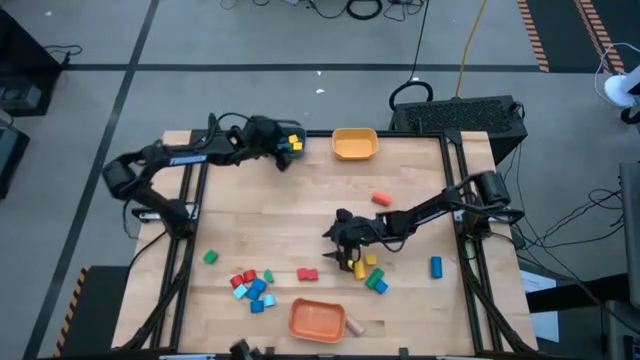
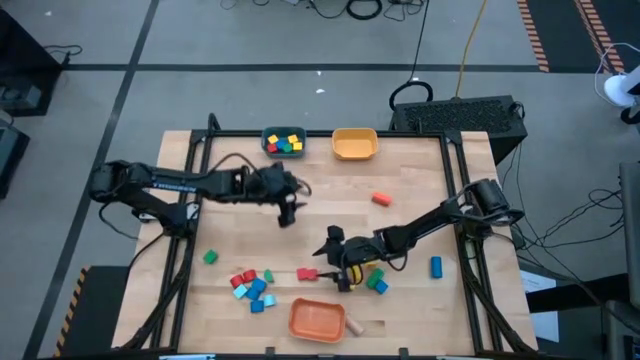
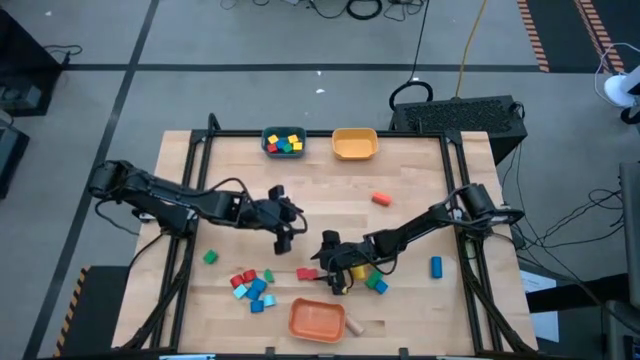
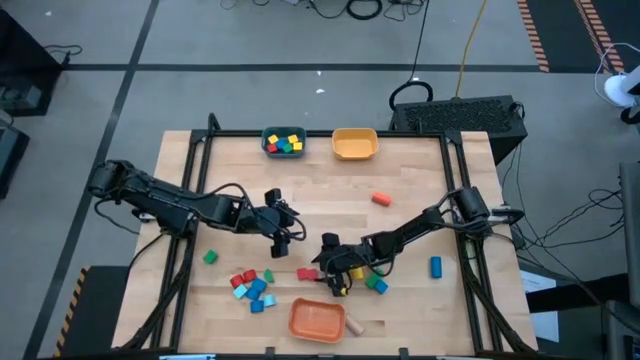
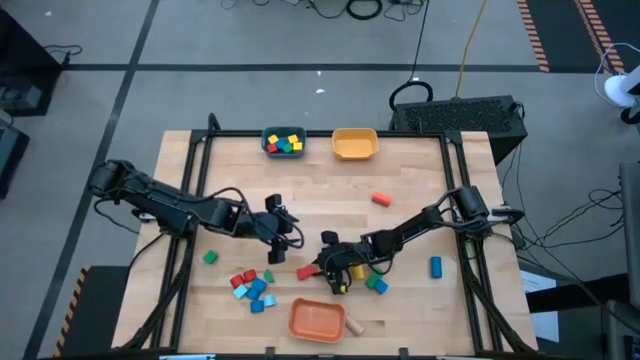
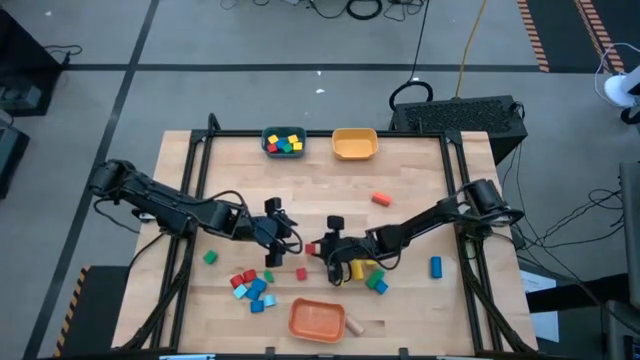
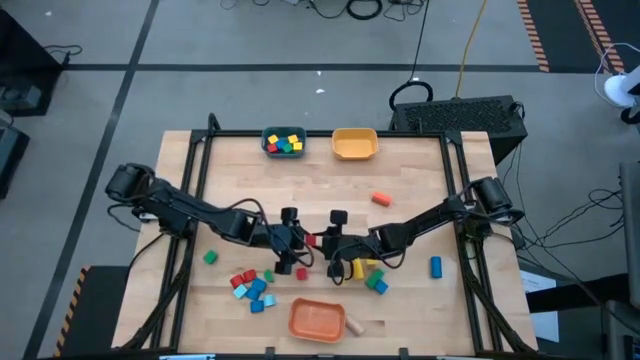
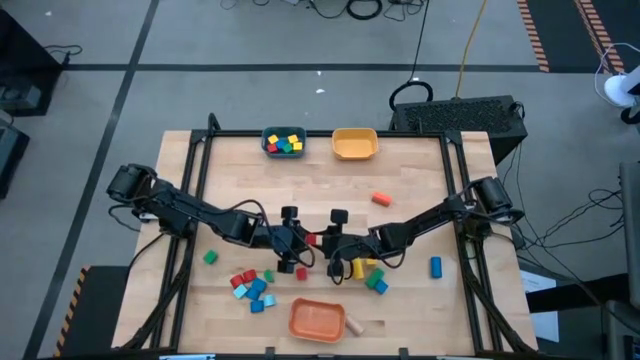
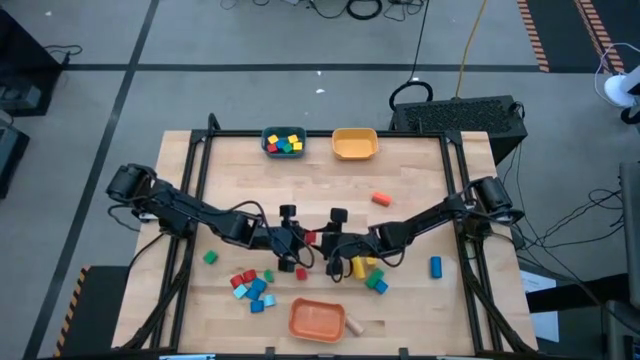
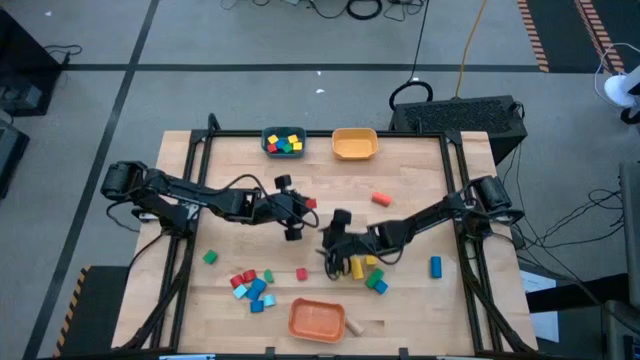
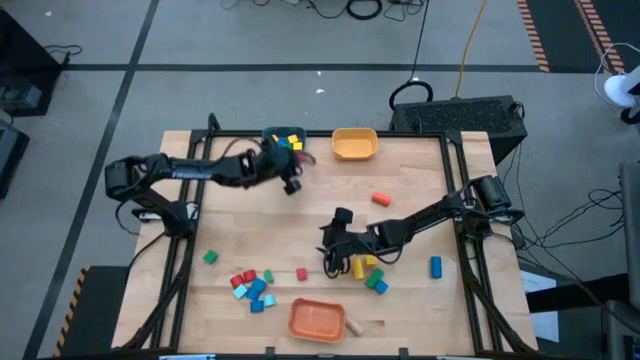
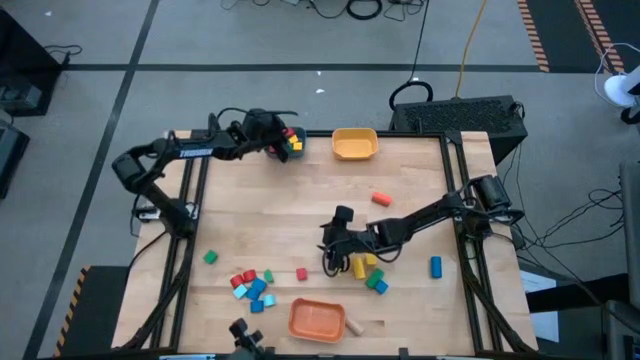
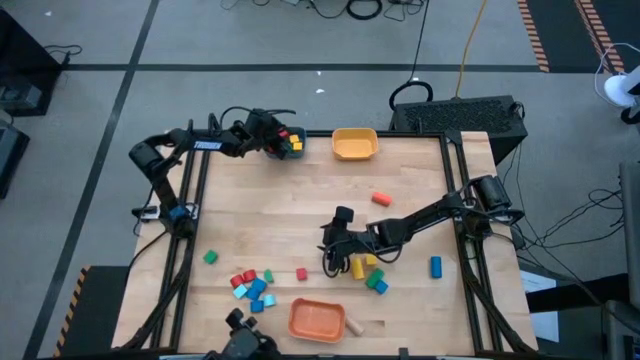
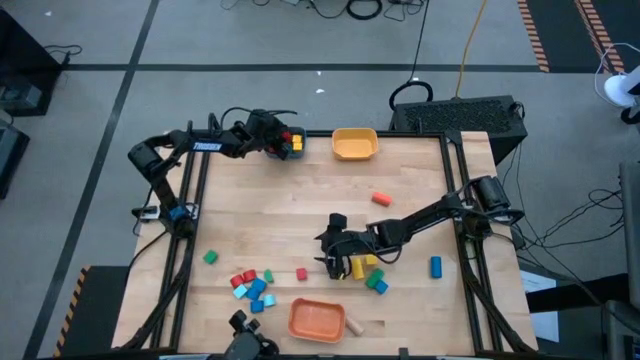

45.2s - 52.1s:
Task: Sort blocks by size
Put the red square block into the blue bin

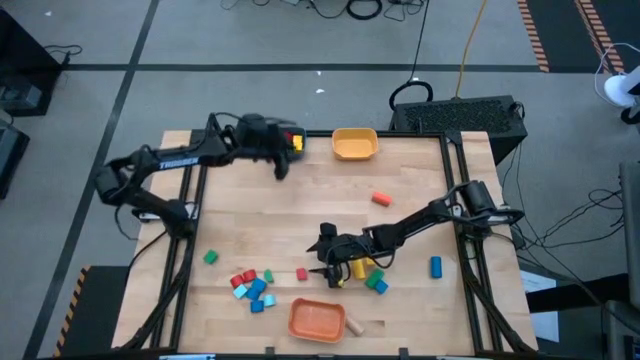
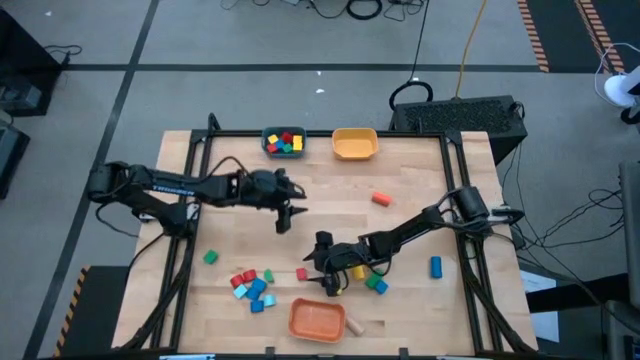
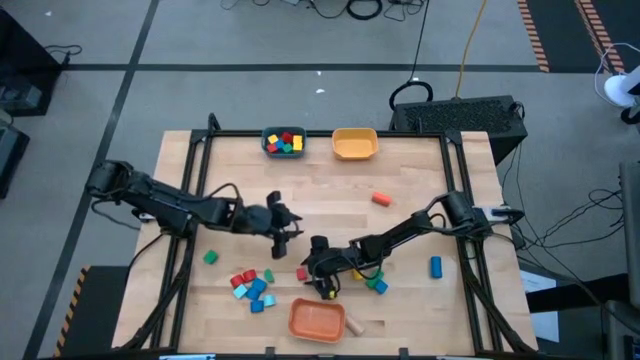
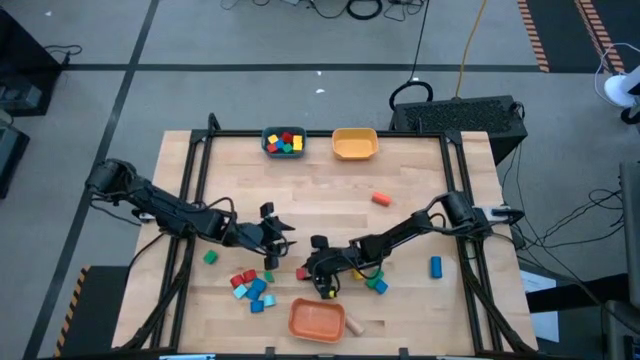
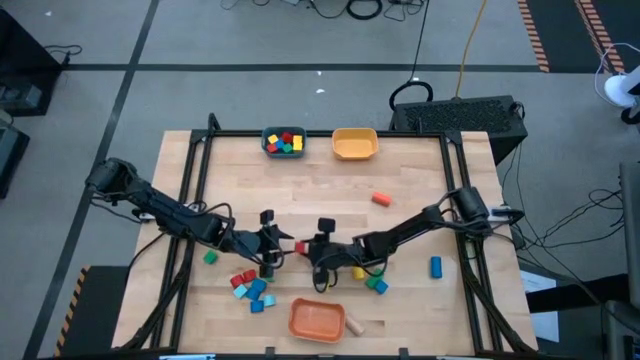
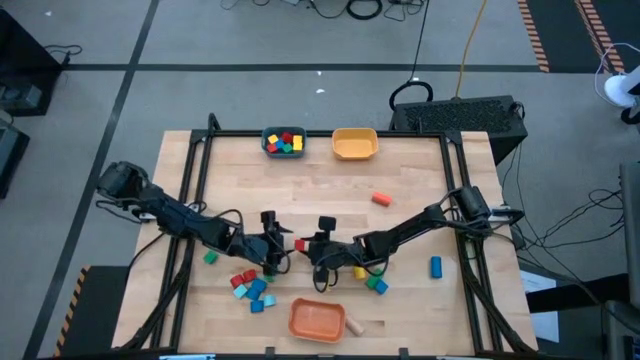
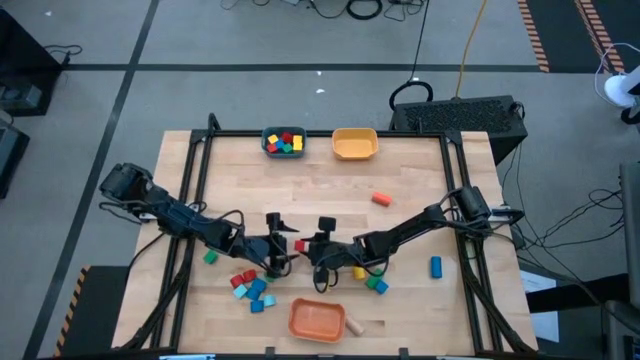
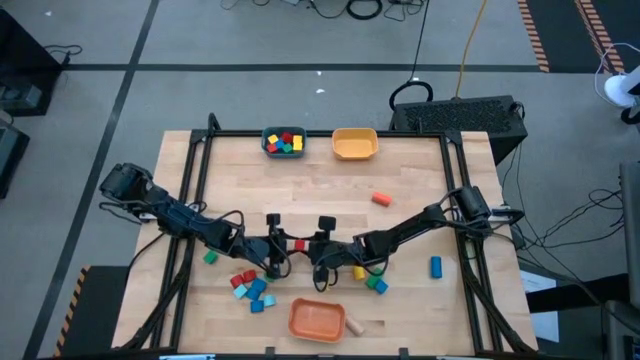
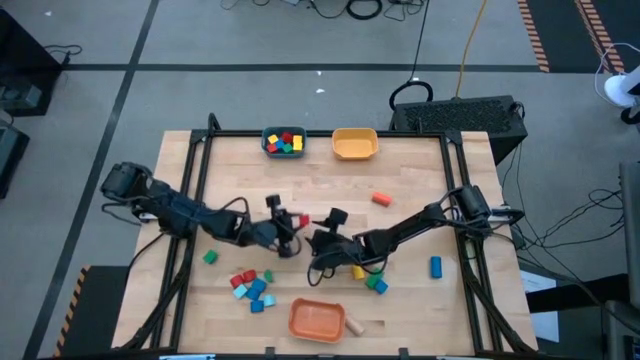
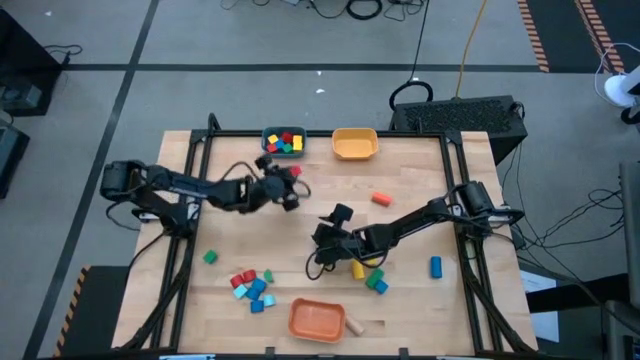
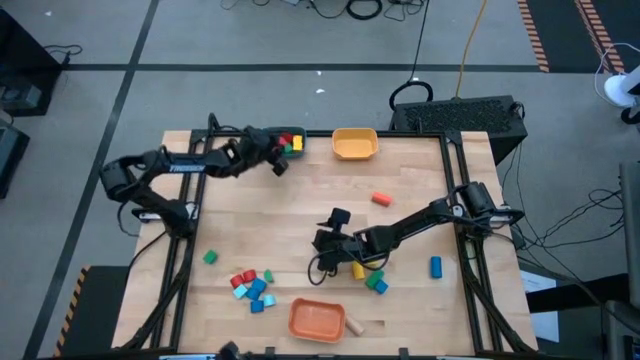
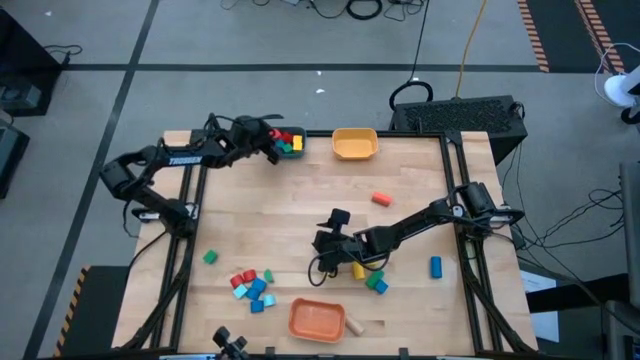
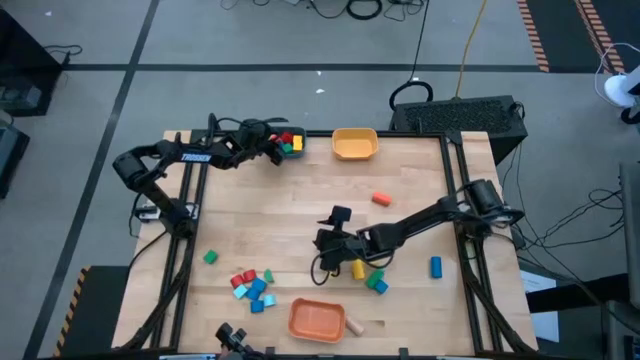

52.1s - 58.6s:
Put the red square block into the blue bin

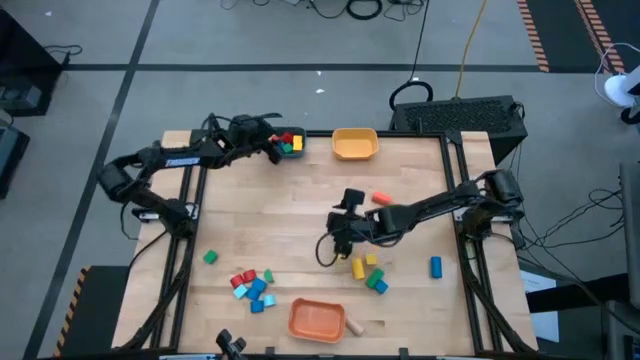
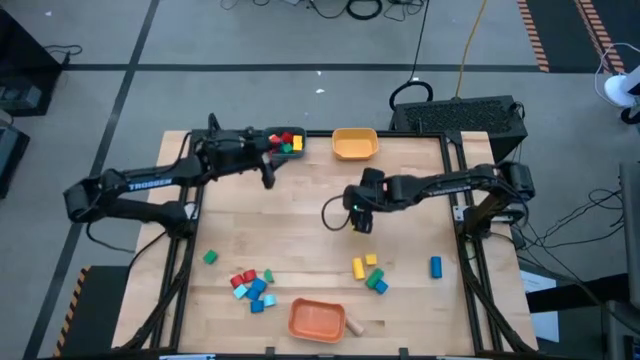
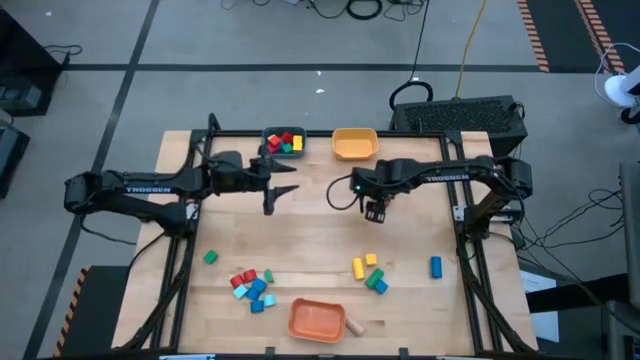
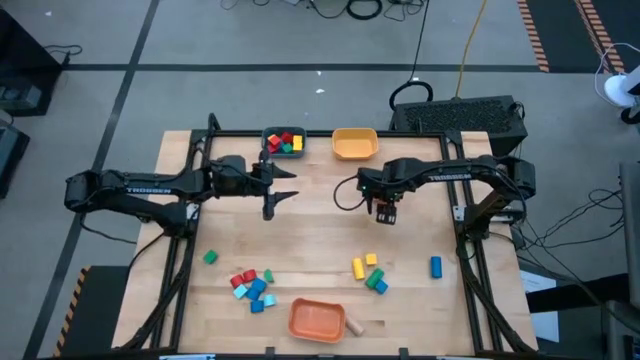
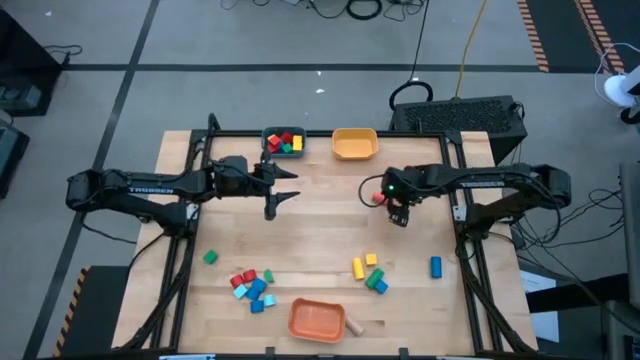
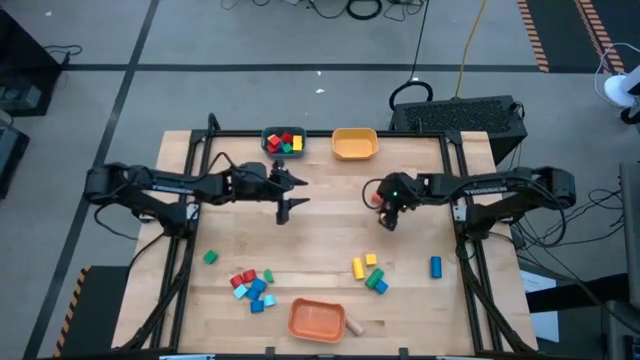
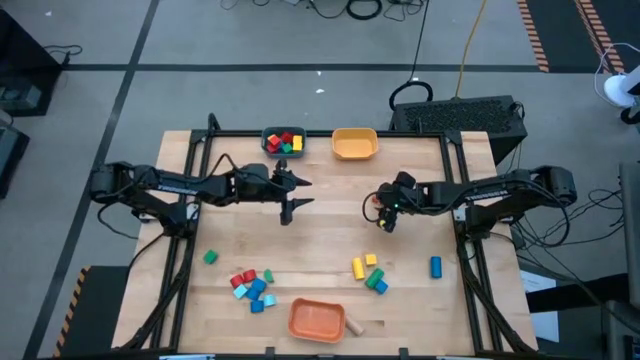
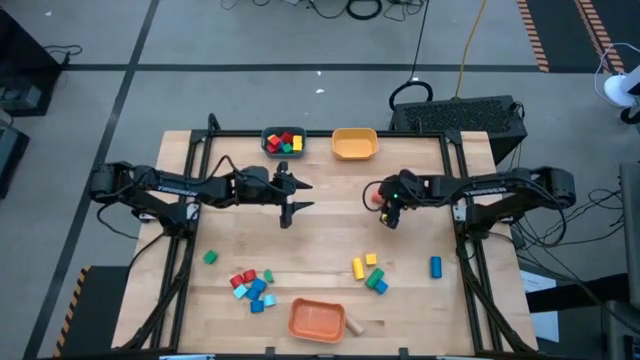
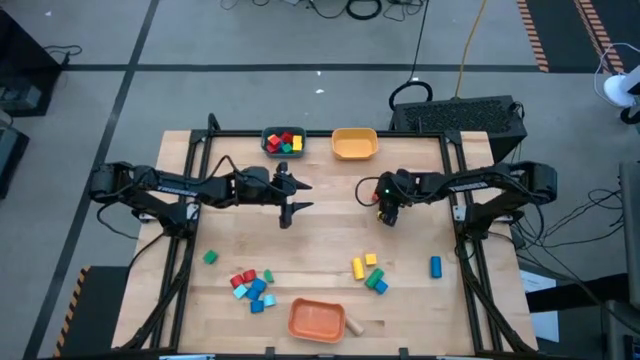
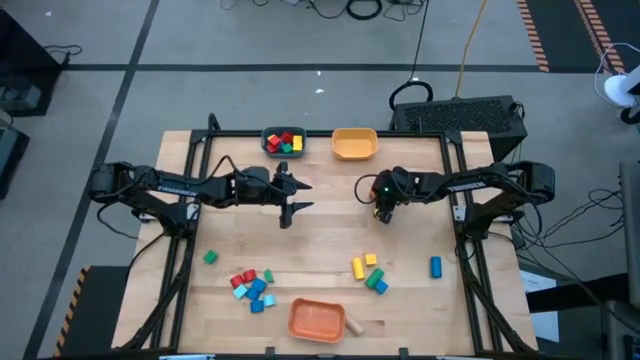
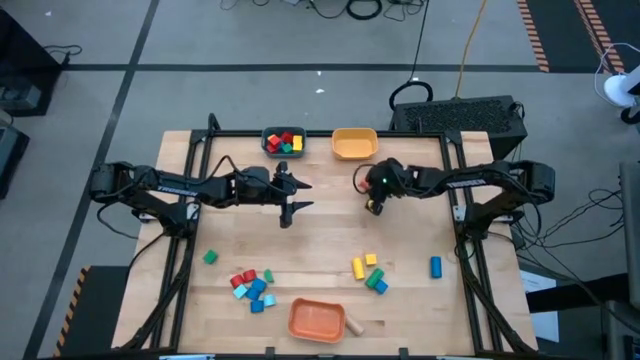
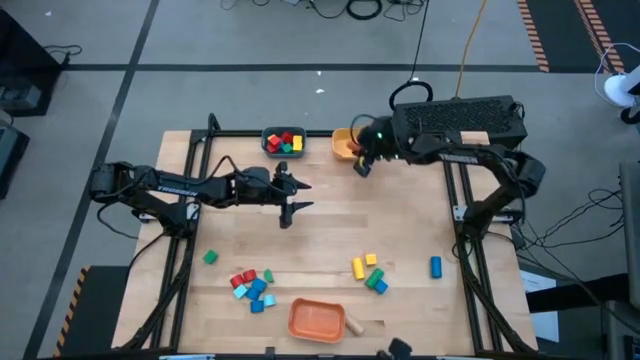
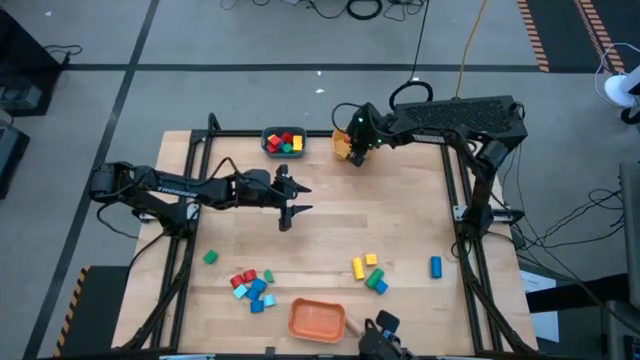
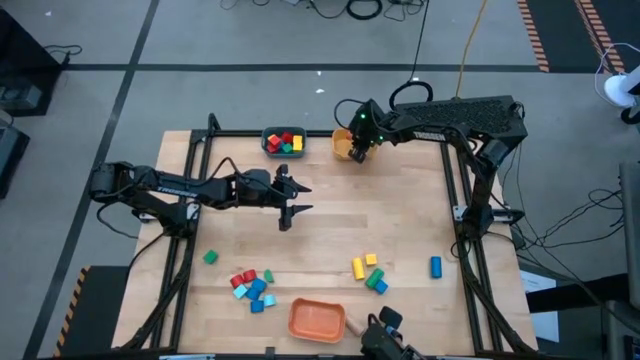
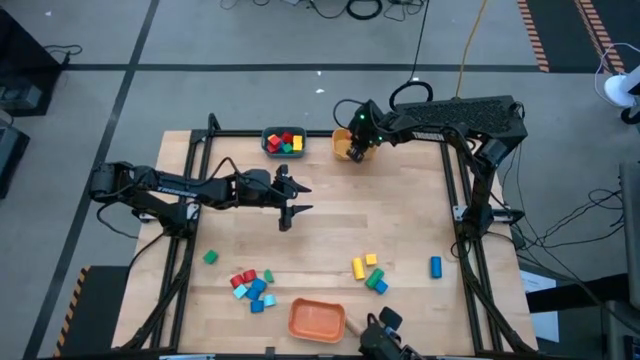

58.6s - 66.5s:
Put the orange cylindrical block into the yellow bin

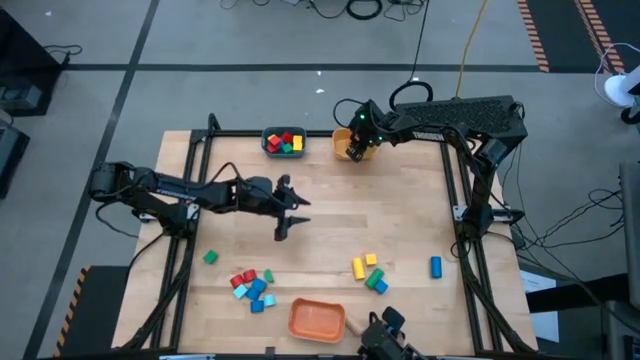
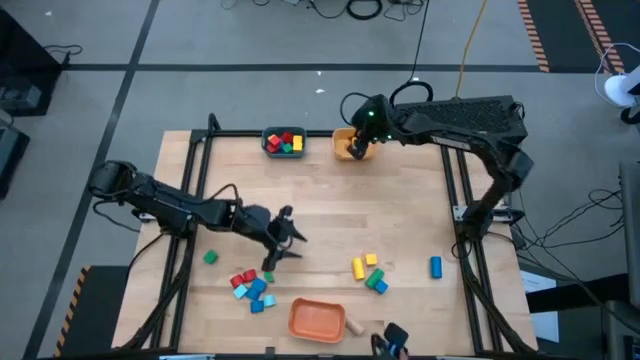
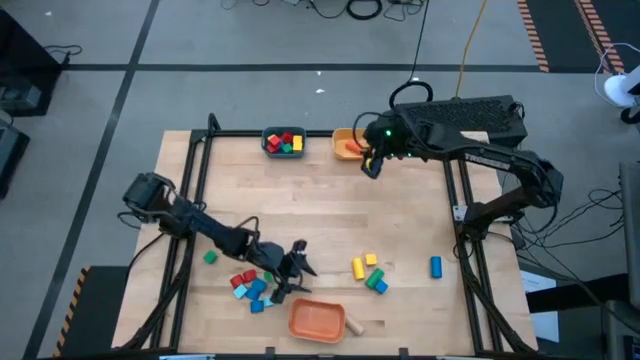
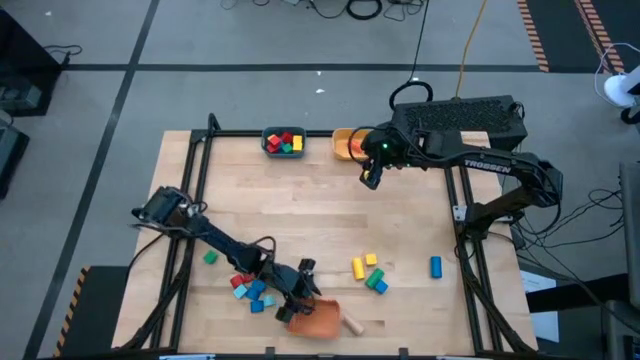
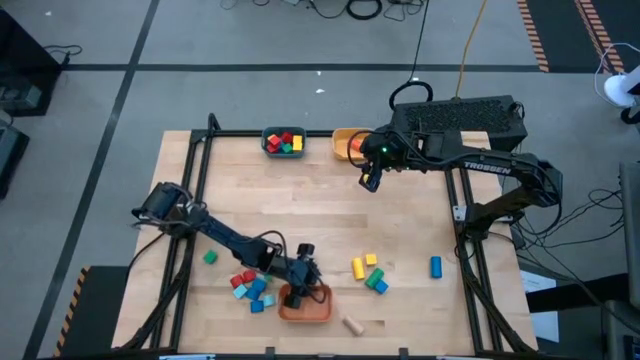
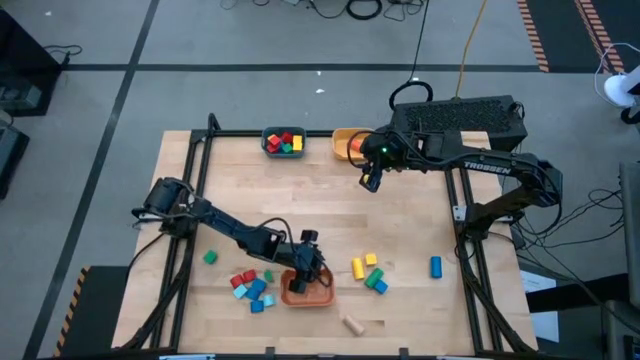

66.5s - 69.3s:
Adjust the orange bin
